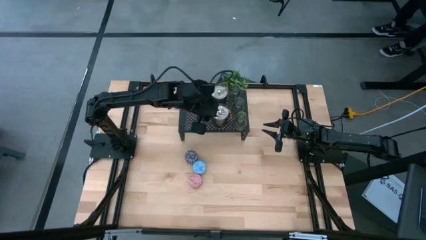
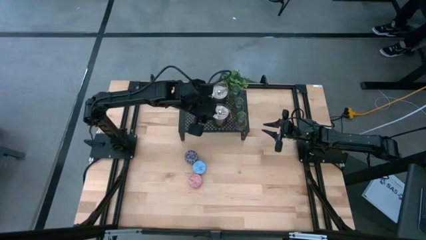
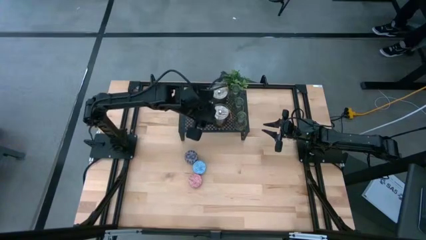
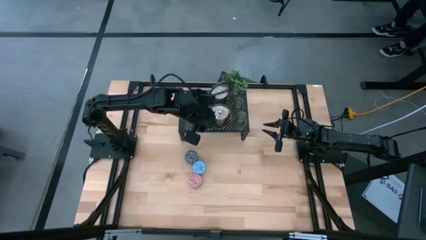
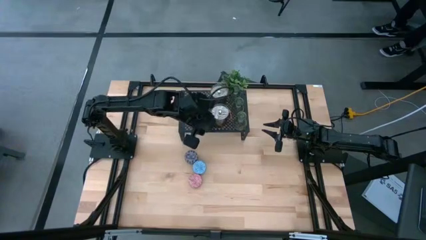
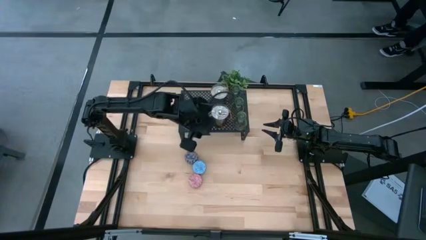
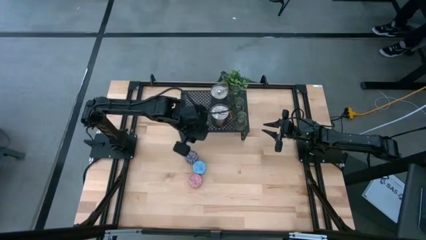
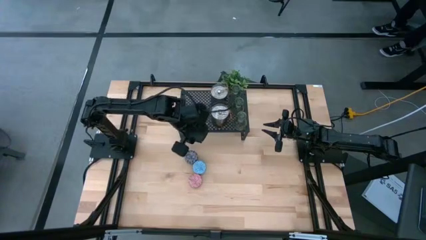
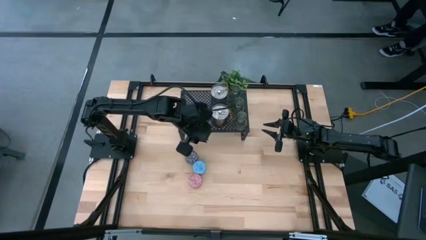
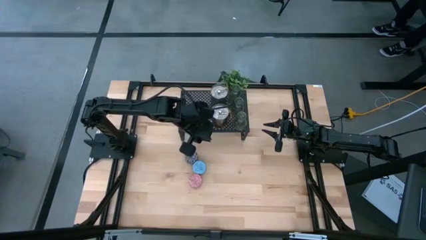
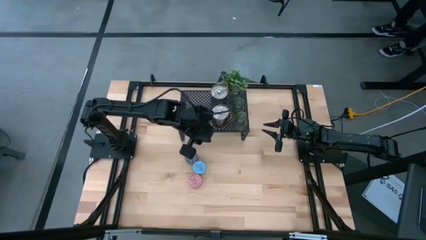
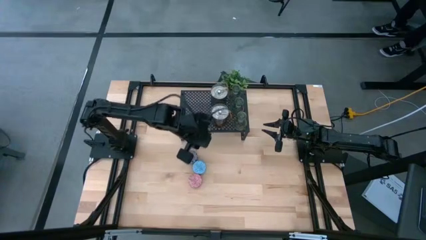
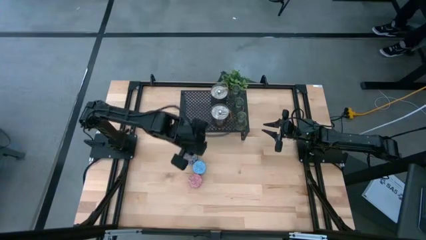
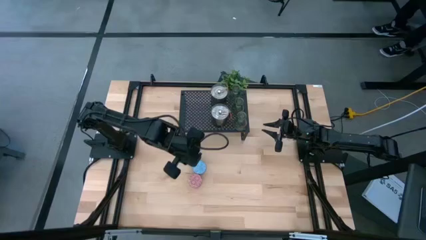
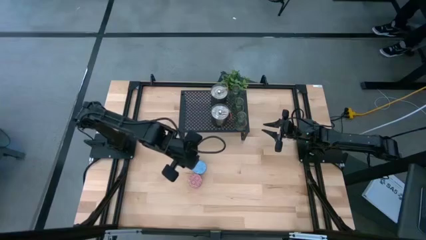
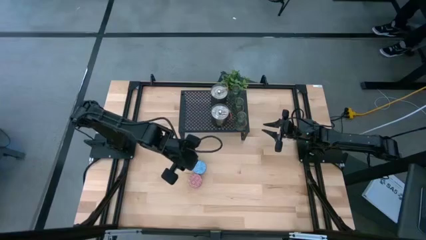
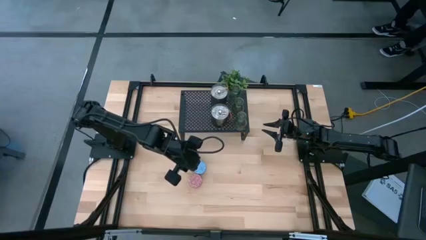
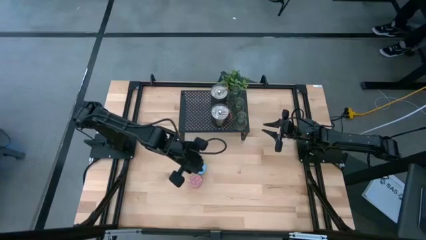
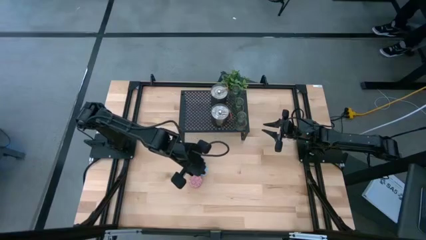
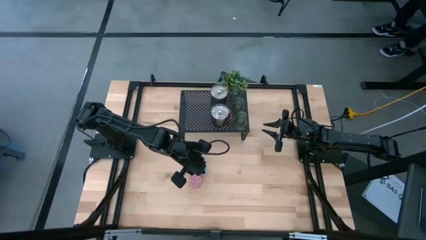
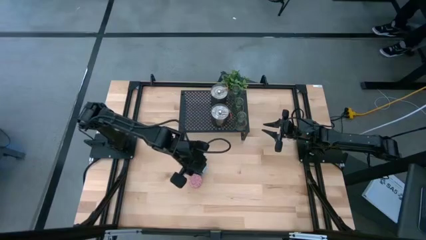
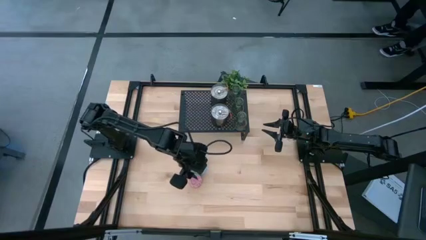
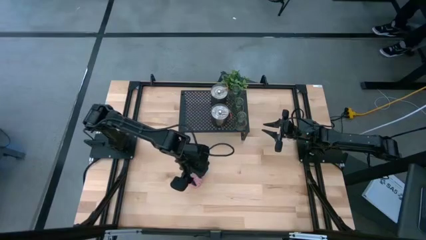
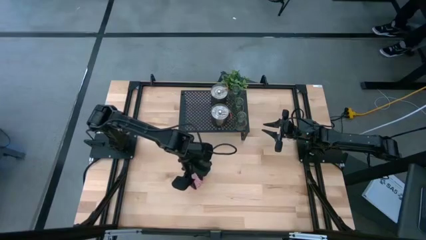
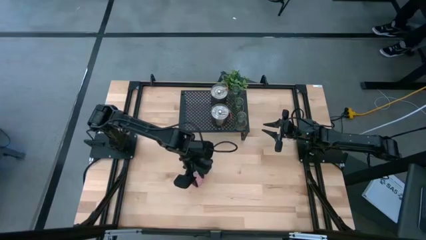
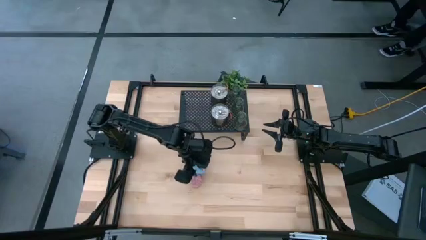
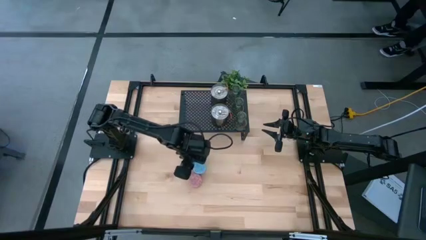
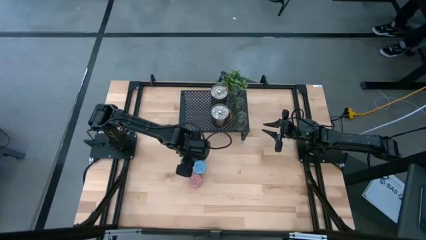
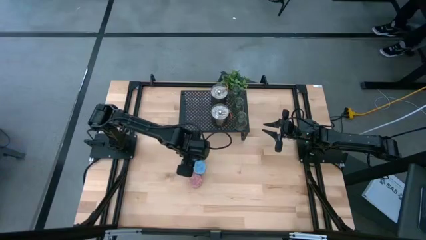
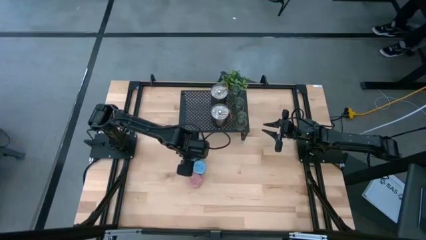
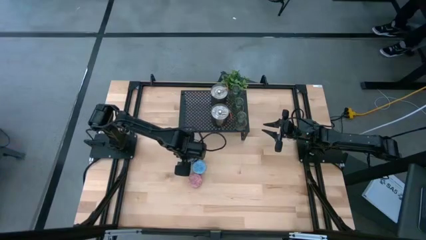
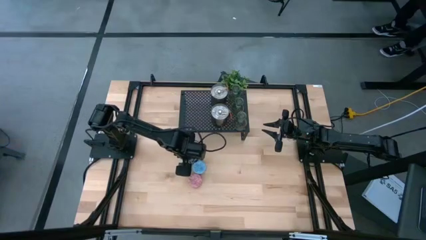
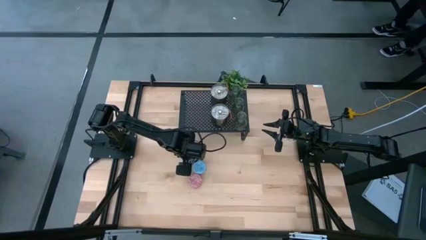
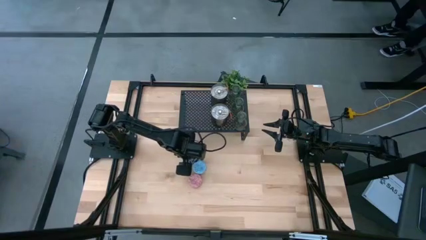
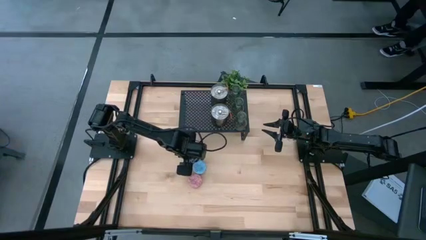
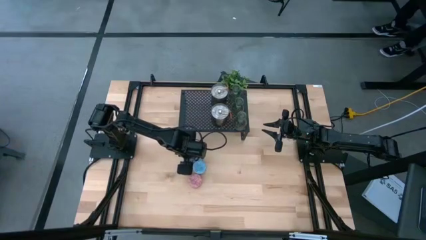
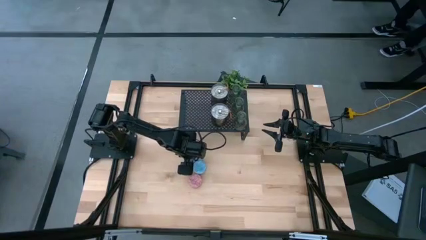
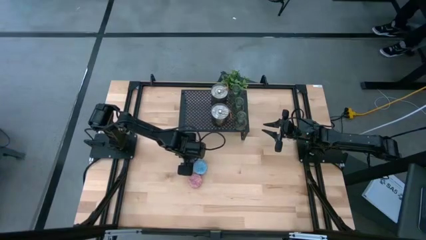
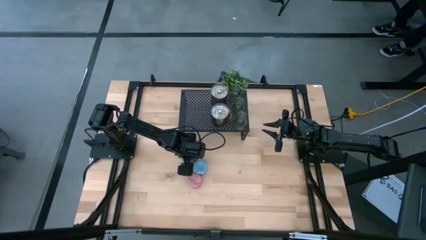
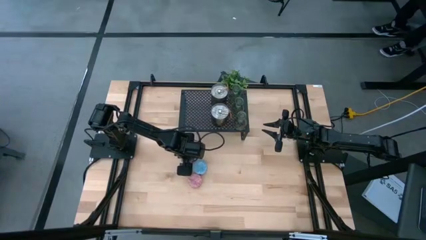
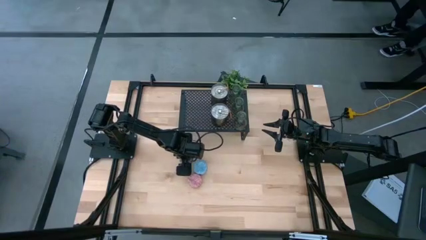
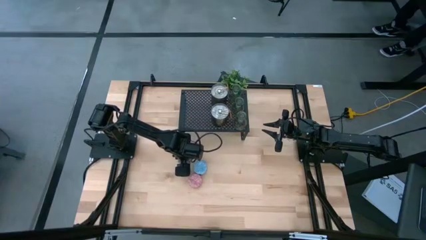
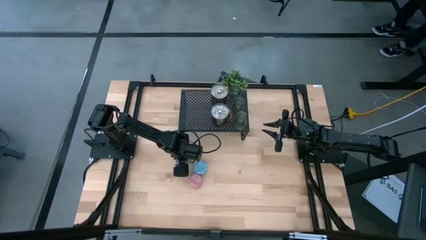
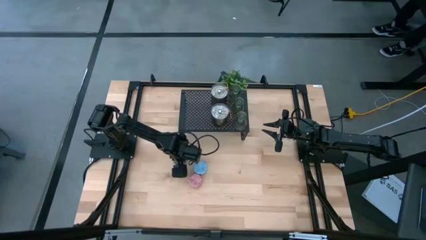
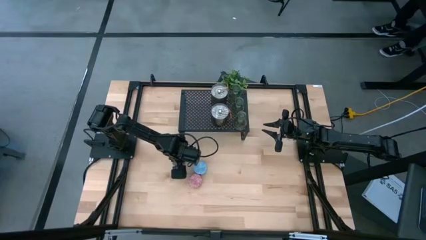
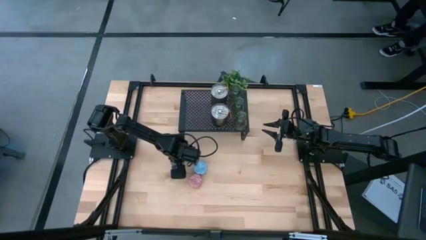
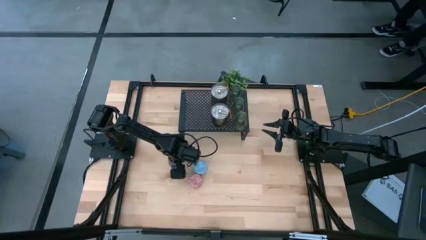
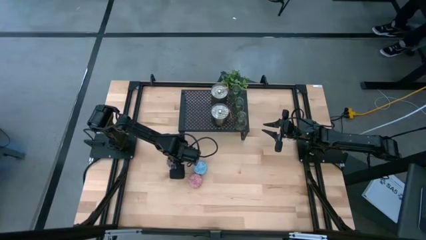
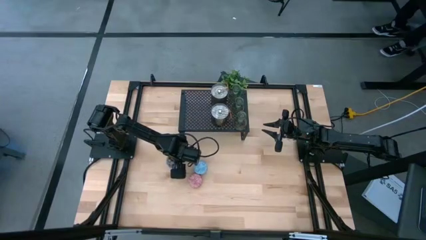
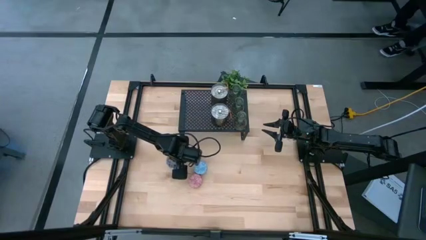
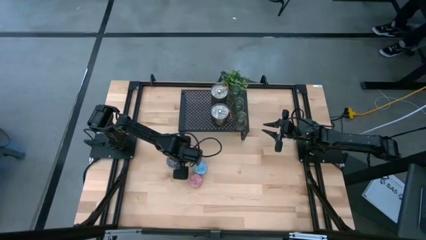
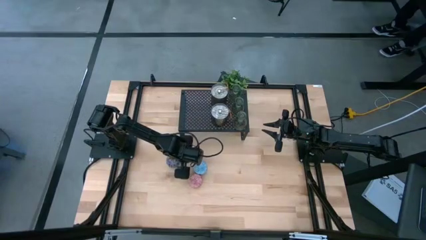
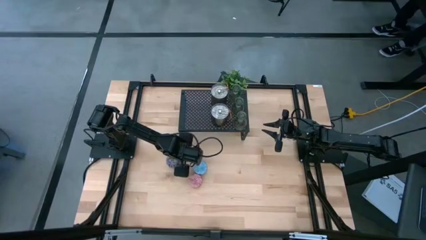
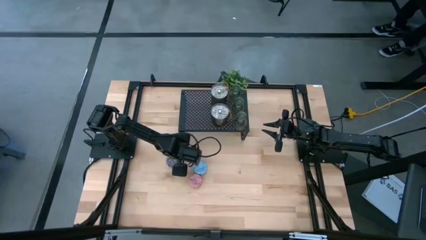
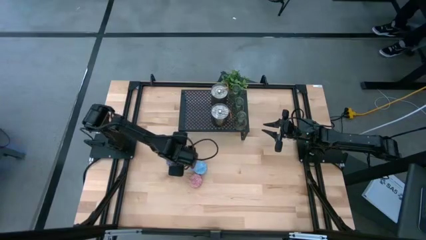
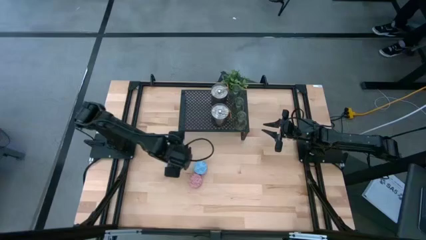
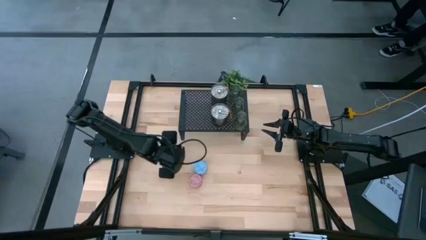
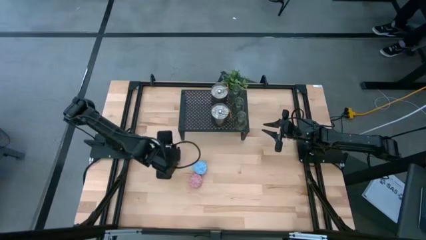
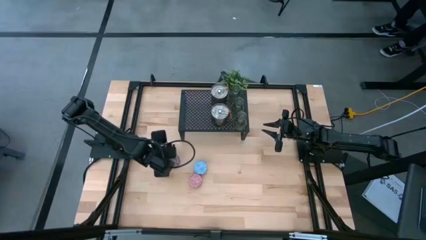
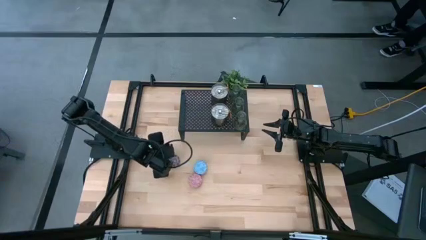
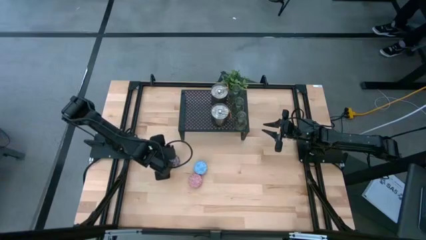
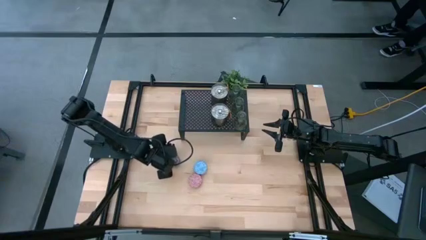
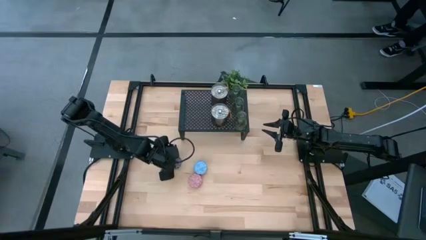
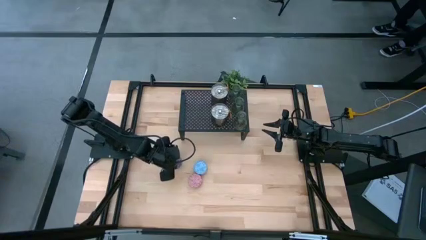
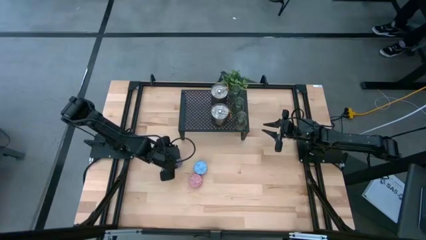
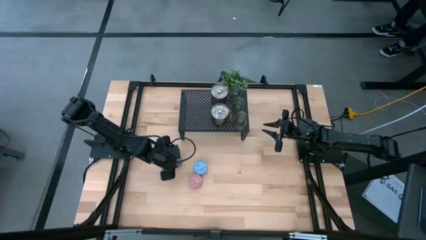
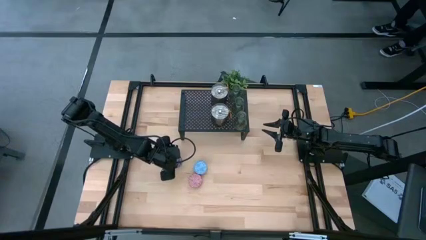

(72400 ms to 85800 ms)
Task: Pick & Place candle stick holders
Put the red patterned scented candle on the shelf

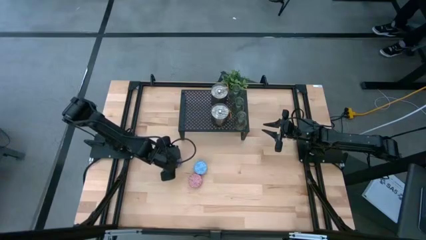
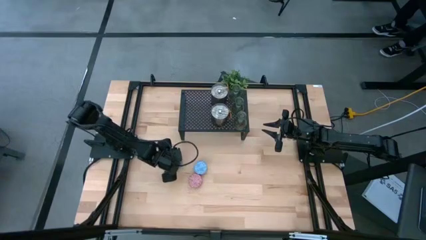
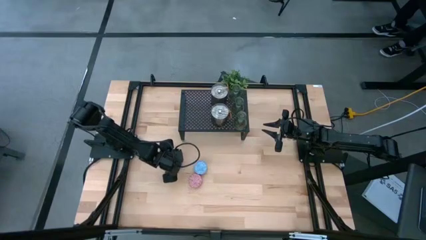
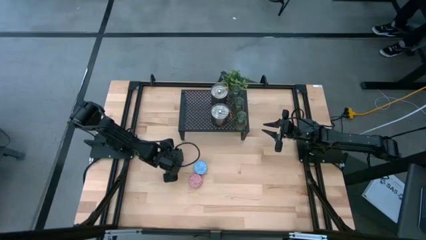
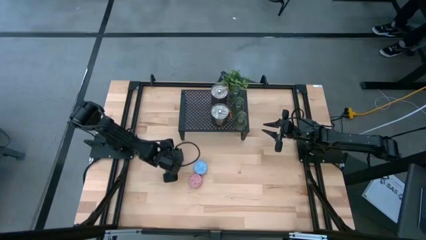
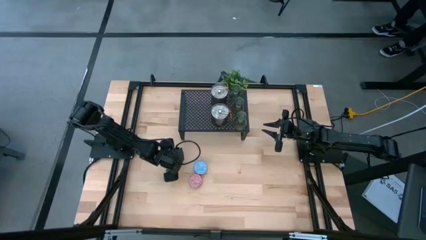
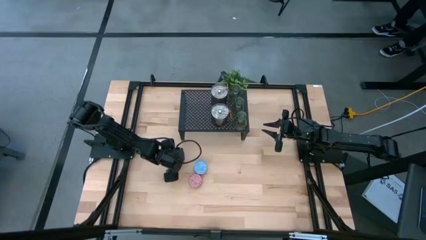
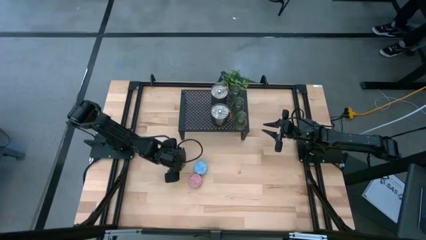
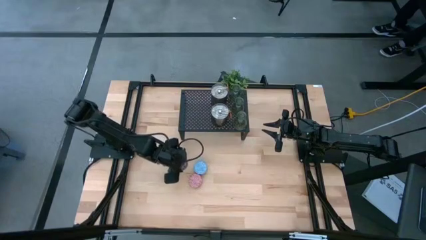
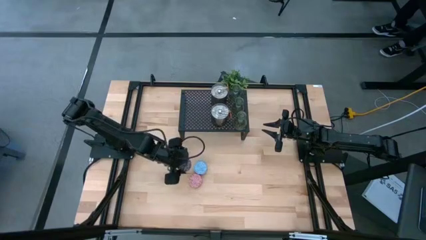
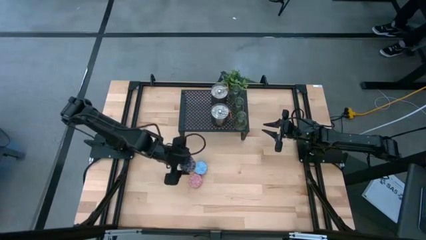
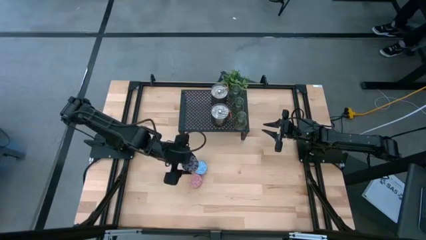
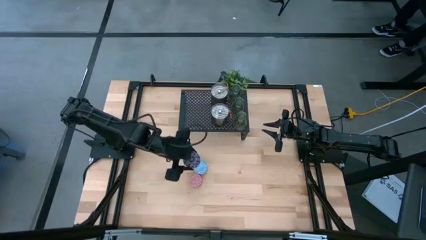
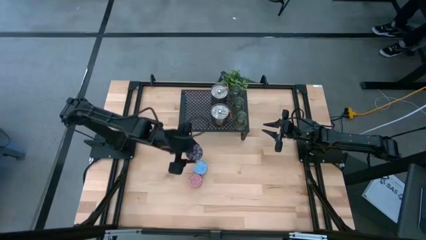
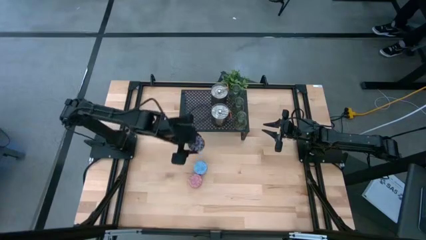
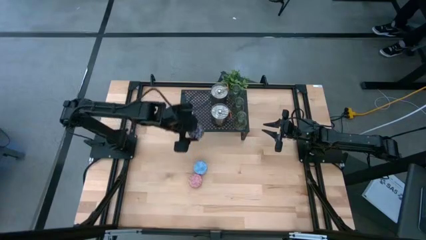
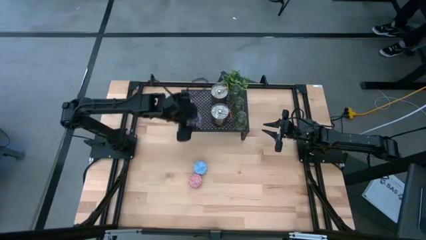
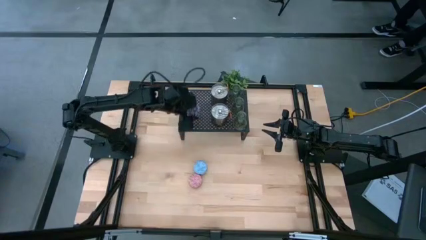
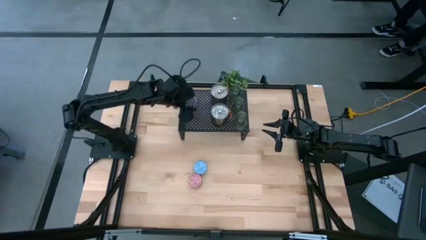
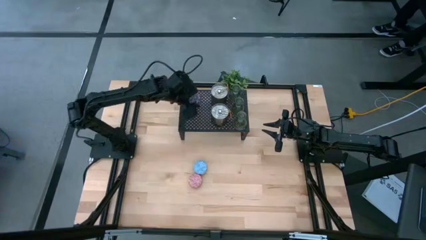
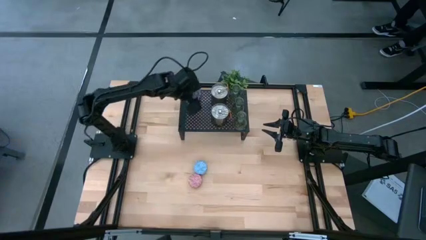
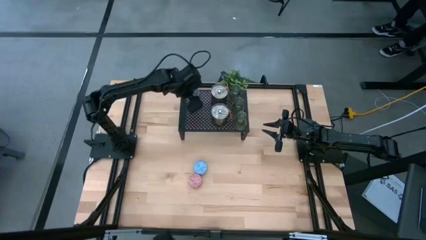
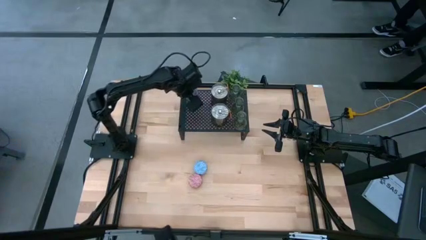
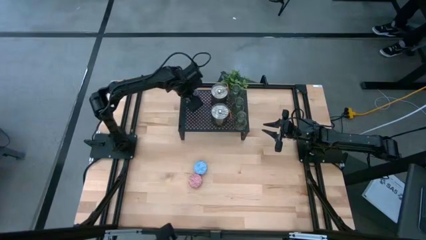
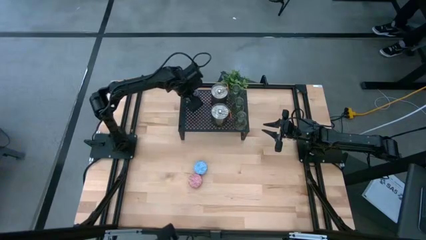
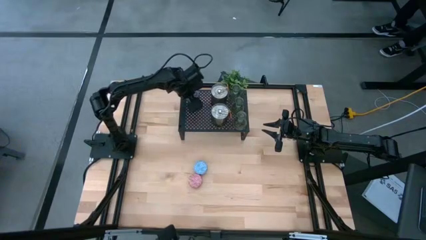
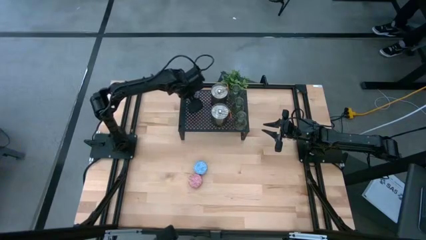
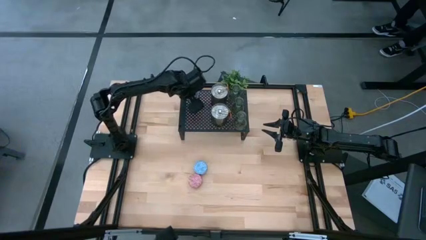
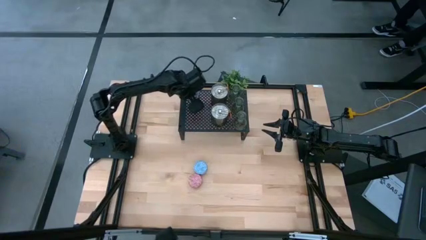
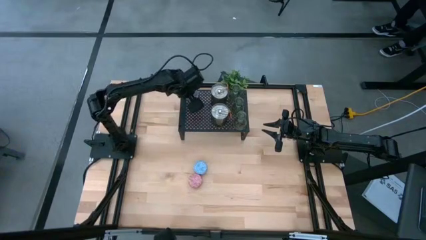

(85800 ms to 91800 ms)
Put the red patterned scented candle on the shelf
